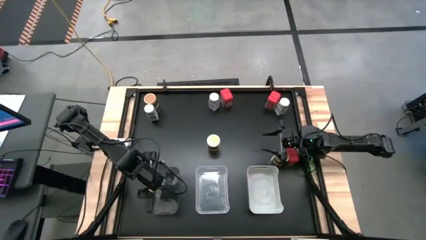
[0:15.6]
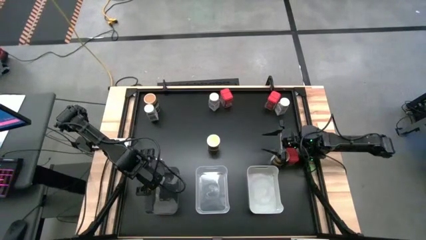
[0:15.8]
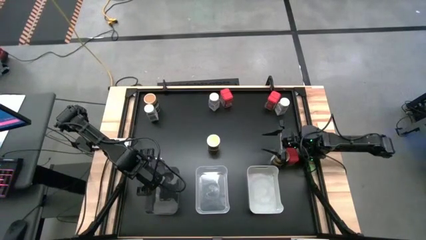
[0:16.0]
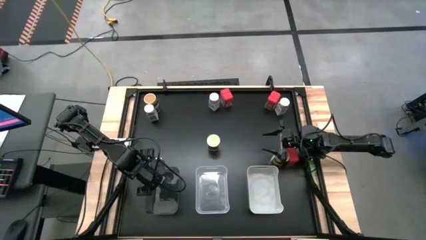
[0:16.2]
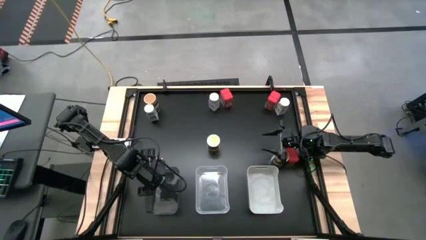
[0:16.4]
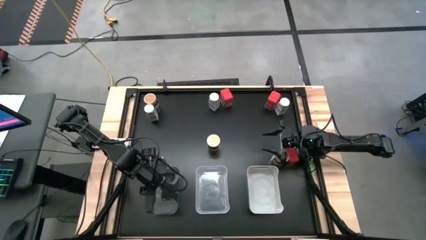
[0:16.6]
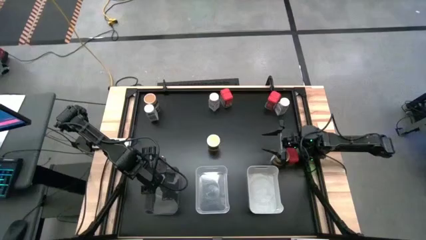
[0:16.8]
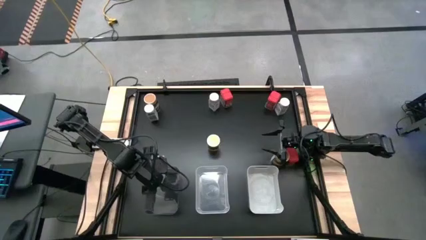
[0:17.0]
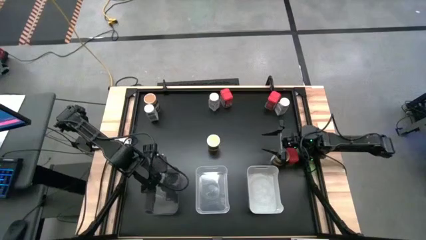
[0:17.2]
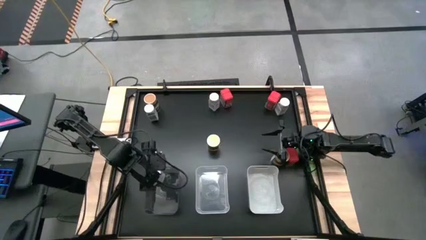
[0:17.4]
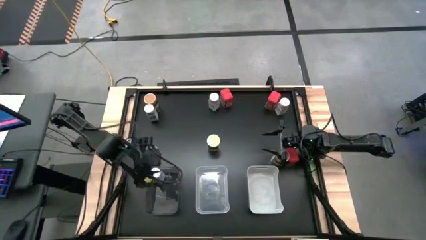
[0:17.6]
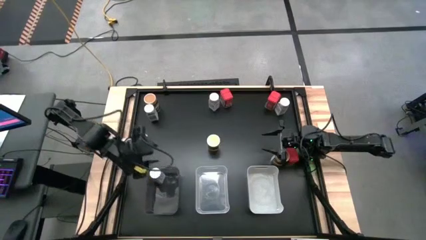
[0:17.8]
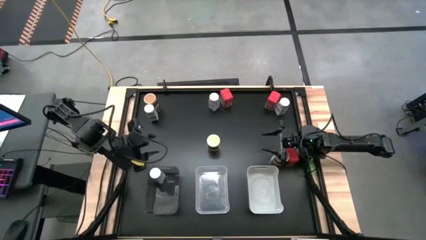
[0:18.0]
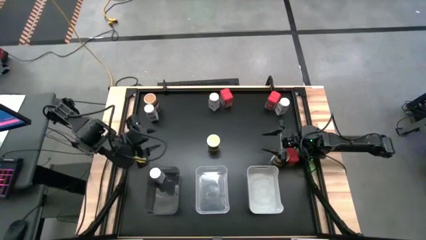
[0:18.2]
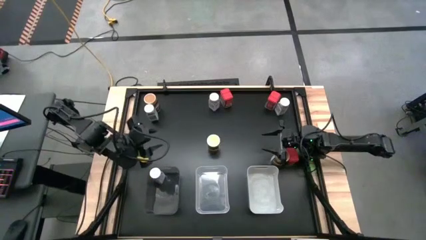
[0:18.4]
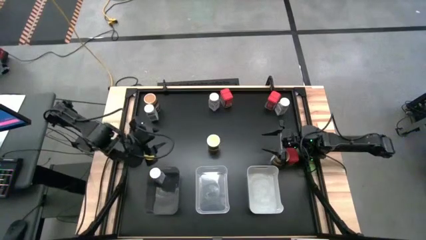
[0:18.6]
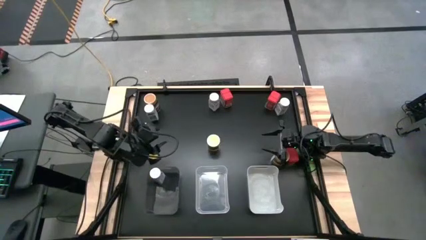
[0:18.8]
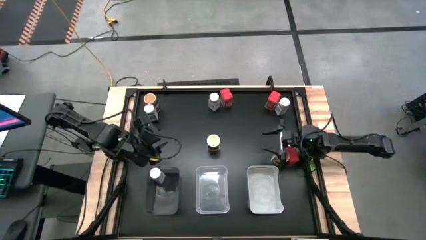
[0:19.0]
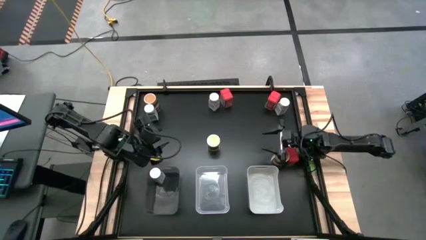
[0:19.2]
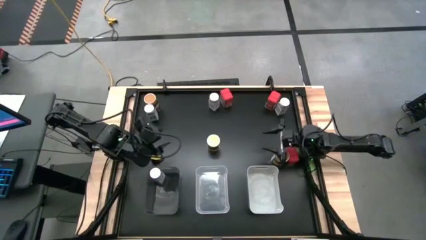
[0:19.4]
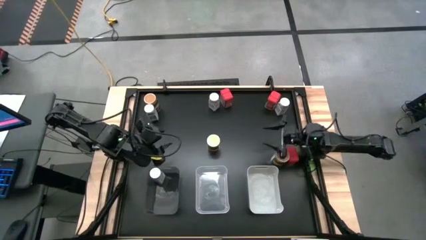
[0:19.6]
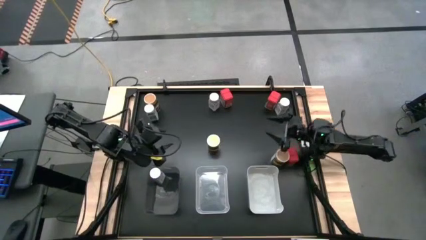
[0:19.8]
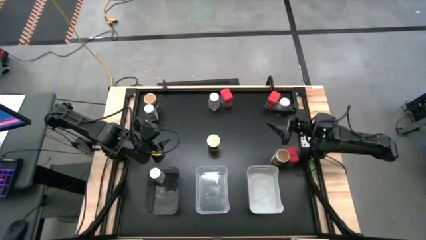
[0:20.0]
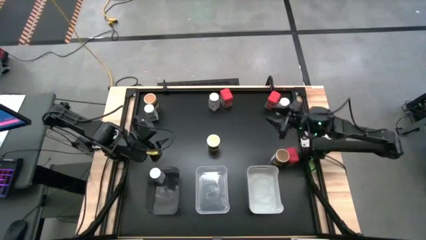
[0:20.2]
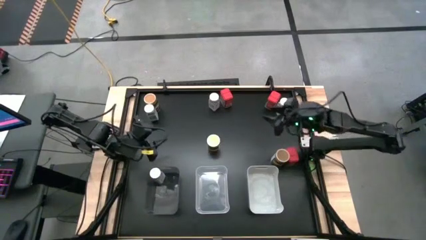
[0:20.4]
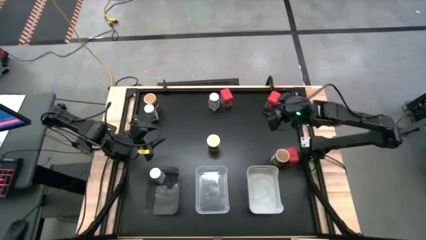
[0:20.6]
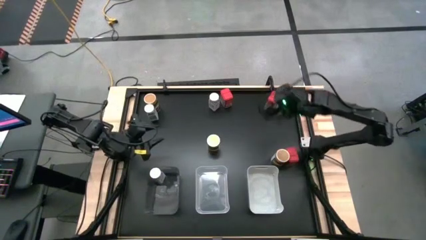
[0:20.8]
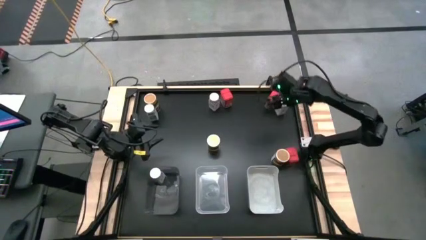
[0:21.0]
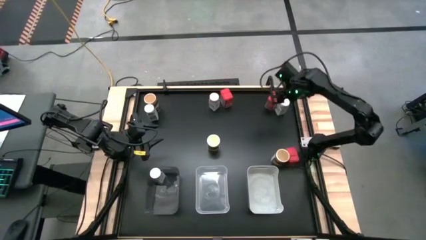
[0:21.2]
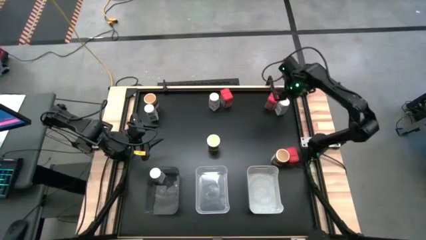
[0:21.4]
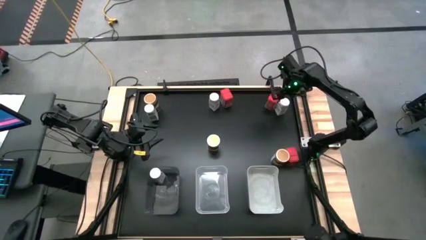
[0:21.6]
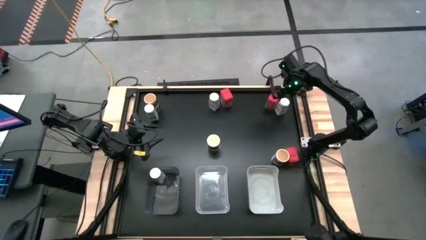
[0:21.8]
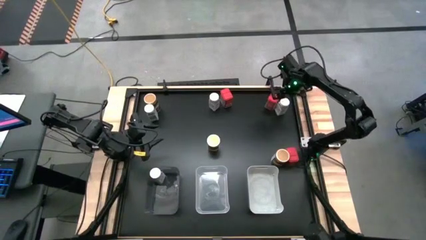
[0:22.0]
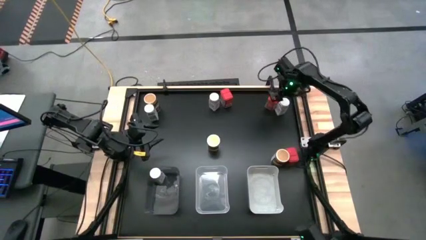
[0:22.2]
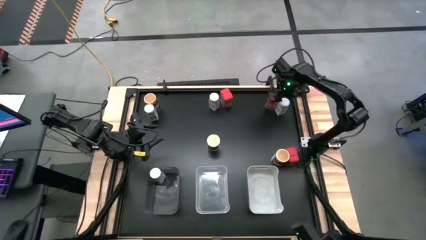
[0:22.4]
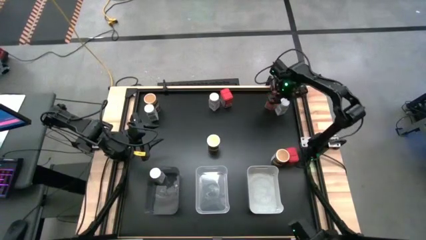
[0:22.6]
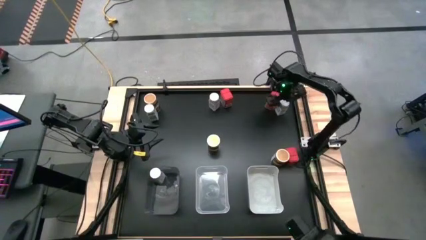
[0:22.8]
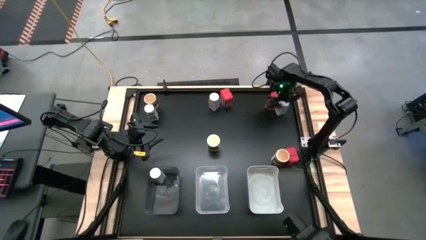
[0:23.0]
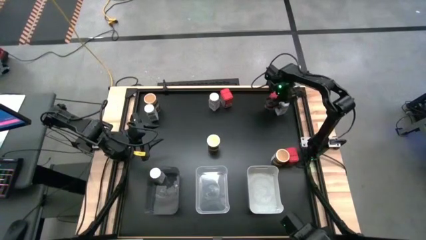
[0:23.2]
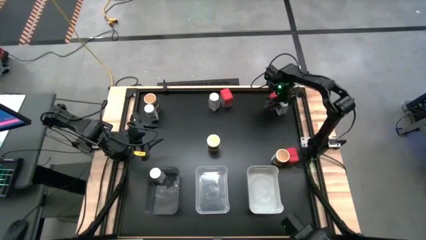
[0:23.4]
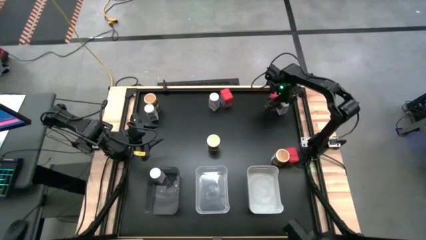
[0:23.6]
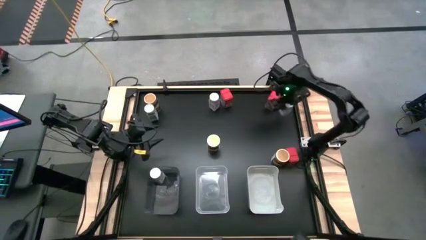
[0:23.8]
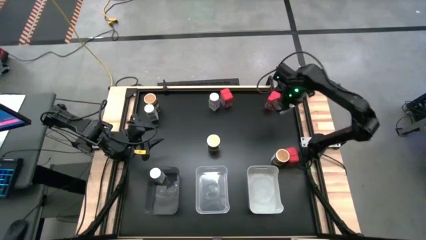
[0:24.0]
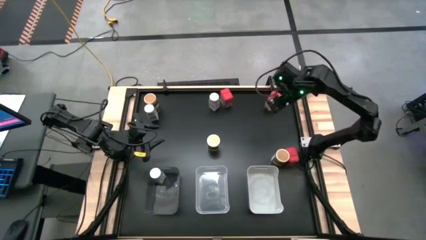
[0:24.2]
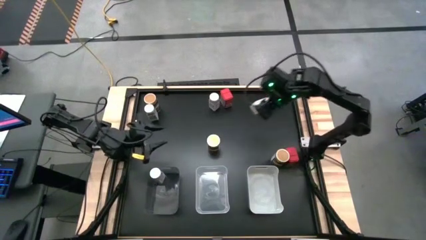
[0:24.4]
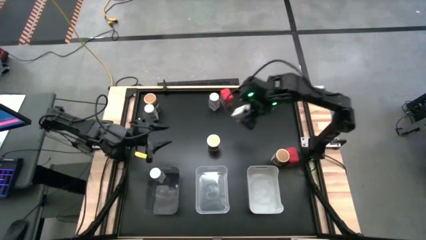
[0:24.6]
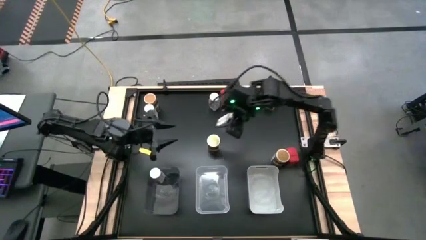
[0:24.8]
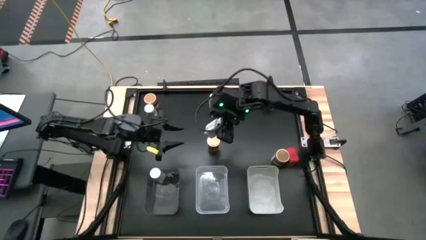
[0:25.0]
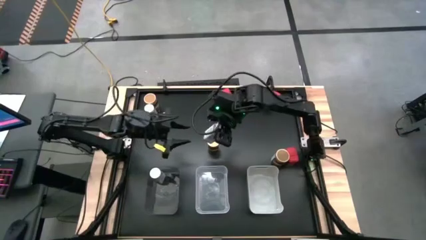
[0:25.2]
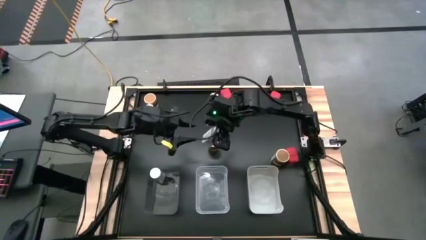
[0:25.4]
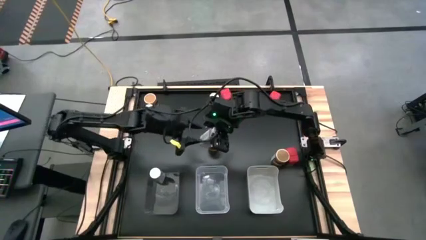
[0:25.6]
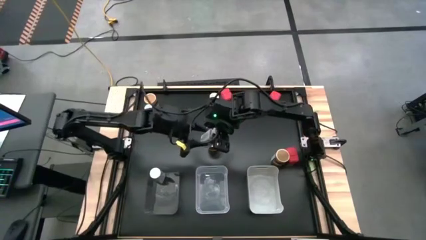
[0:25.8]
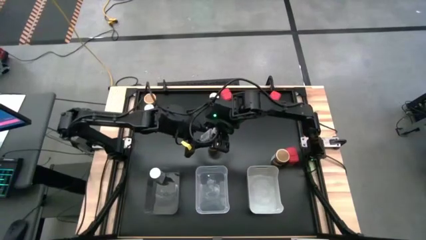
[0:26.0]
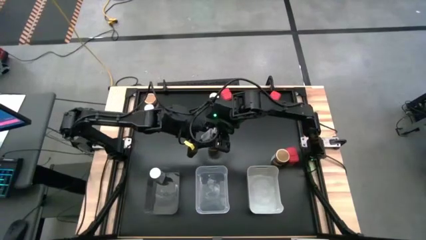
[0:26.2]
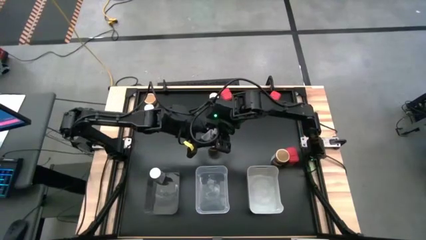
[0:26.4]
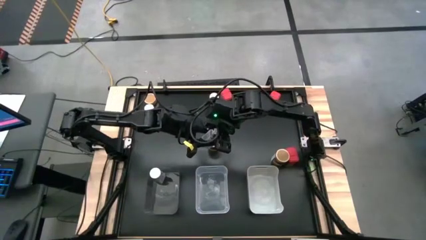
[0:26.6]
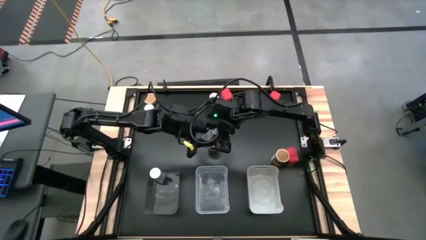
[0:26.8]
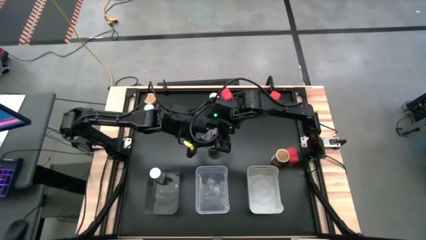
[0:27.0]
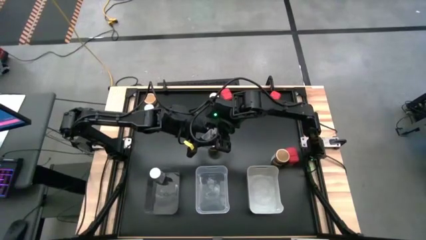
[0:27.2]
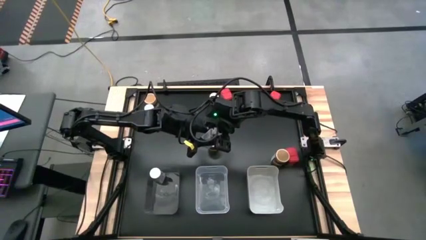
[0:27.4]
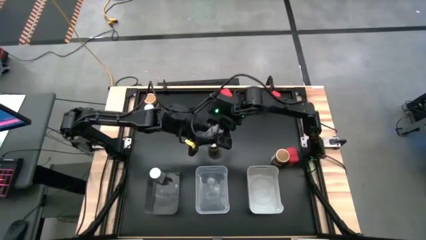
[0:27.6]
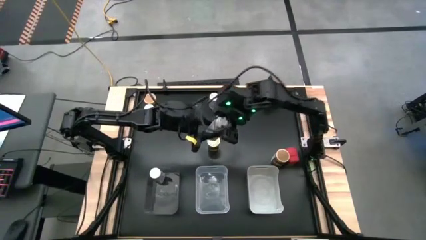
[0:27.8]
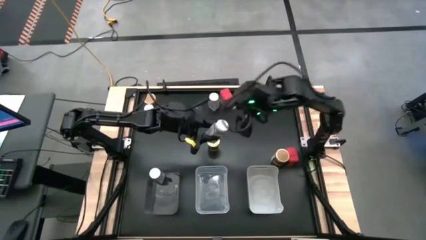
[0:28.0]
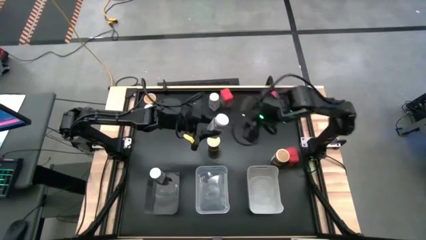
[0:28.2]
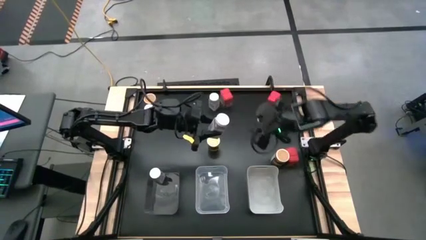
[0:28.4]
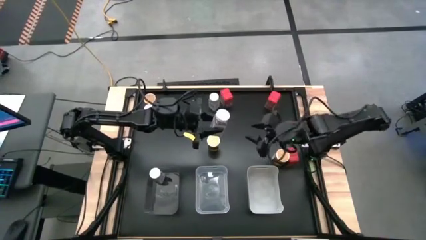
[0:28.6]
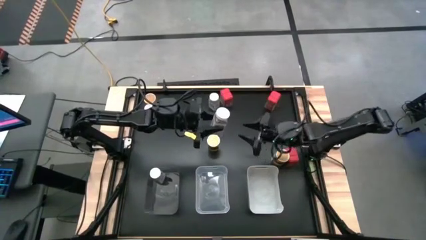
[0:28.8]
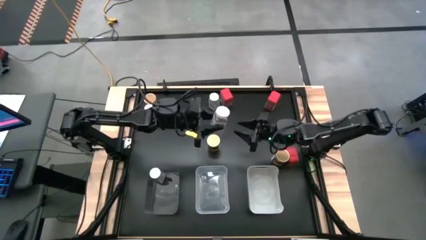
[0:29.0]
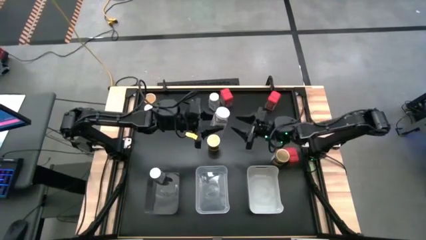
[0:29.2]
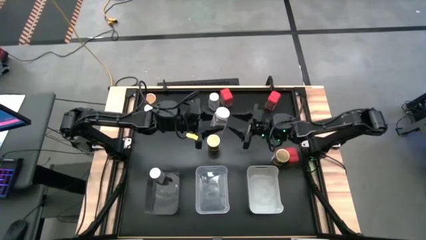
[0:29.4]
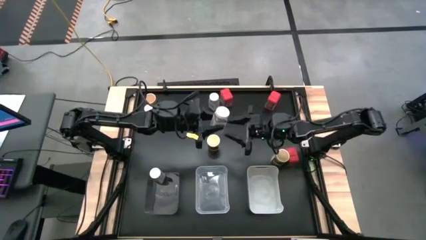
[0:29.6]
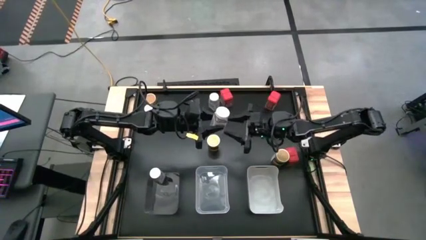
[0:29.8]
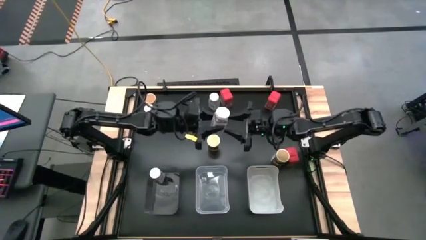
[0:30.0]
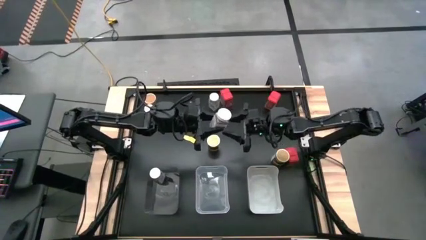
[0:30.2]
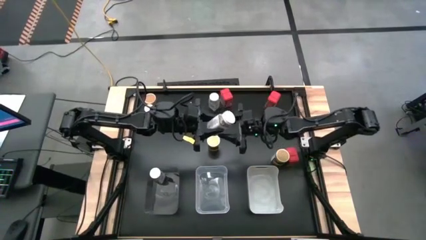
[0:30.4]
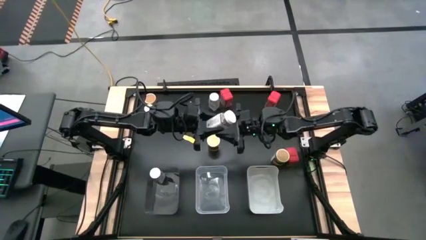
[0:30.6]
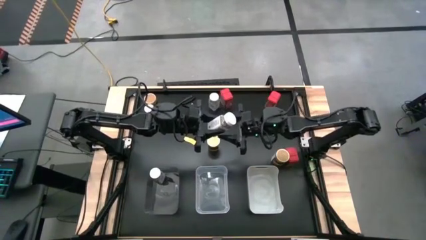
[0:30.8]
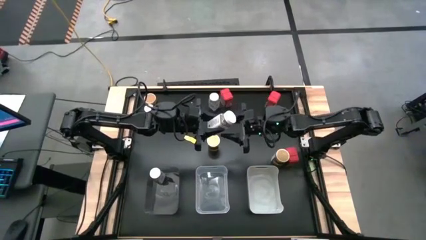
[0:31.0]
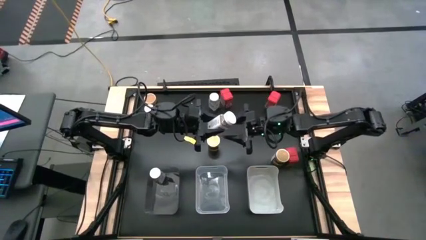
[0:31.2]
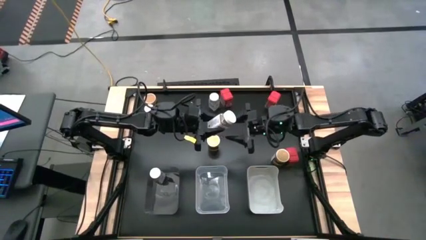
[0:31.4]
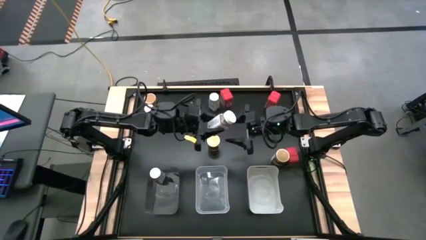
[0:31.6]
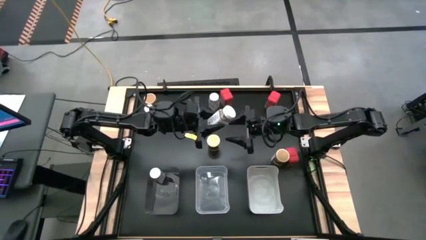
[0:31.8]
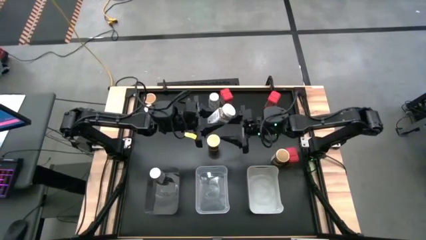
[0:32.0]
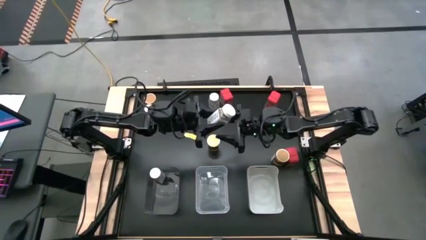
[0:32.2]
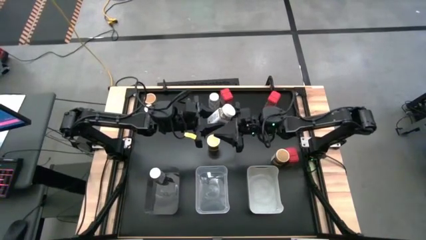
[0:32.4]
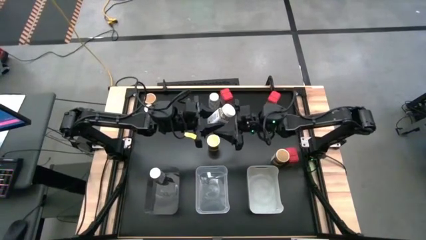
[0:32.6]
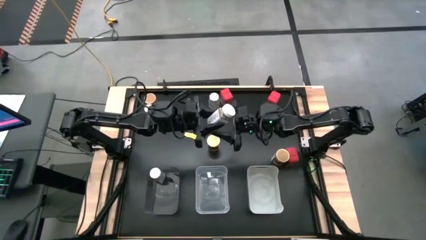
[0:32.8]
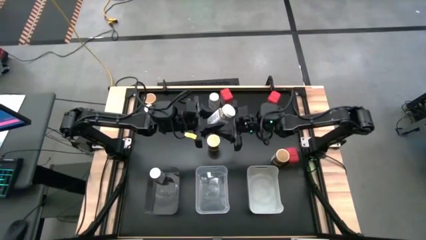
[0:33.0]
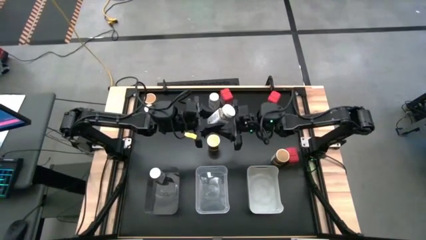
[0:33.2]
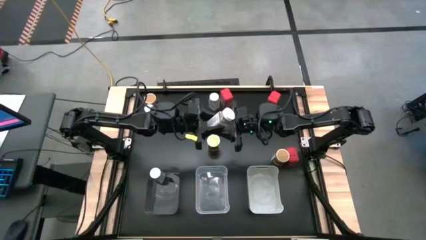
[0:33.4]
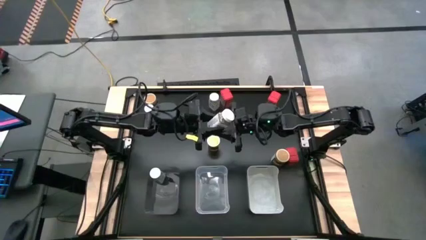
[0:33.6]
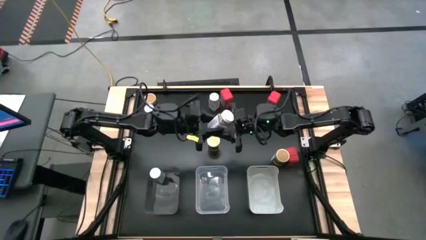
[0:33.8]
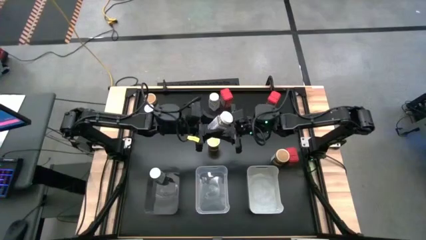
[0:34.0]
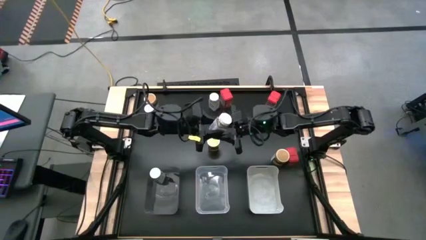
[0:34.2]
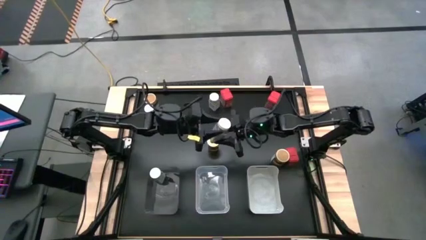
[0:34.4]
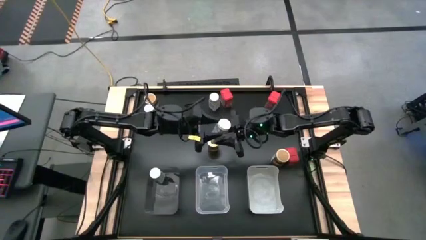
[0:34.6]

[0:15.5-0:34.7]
Task: Sort spices by type
Put the right white seasoning bottle into the black bin
